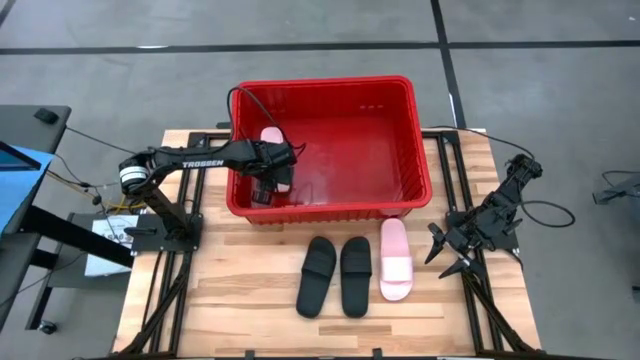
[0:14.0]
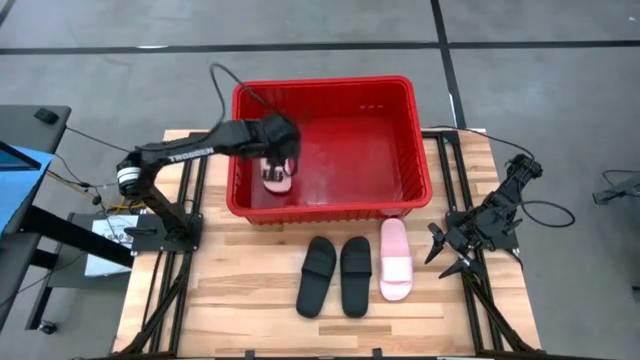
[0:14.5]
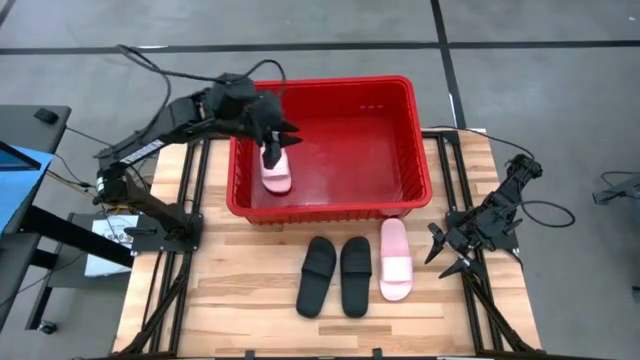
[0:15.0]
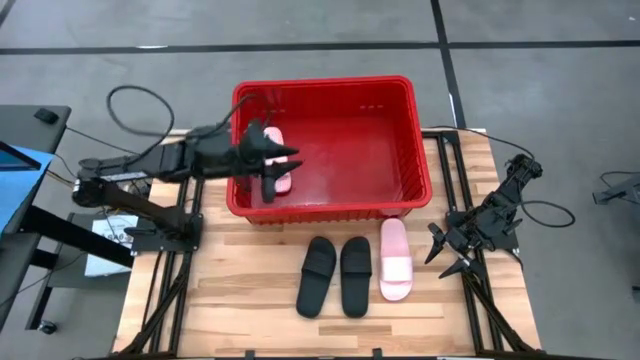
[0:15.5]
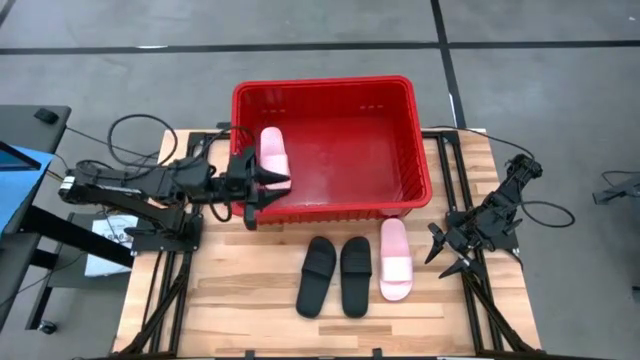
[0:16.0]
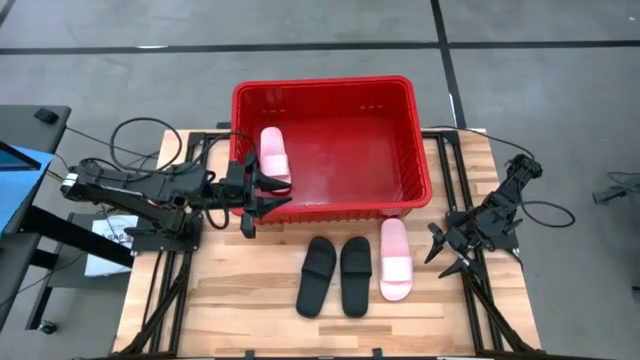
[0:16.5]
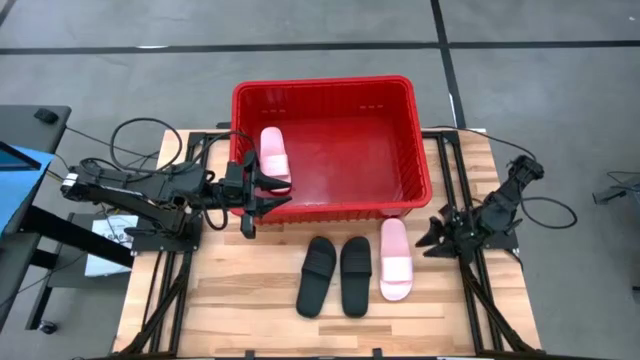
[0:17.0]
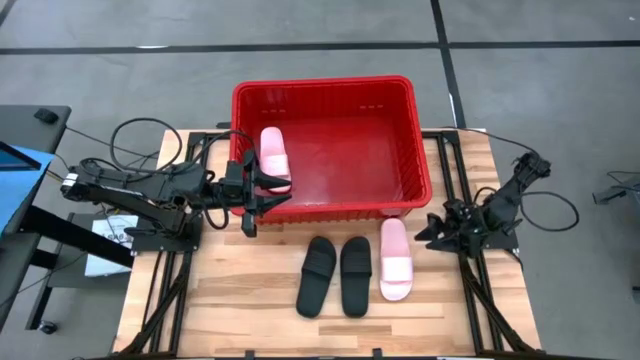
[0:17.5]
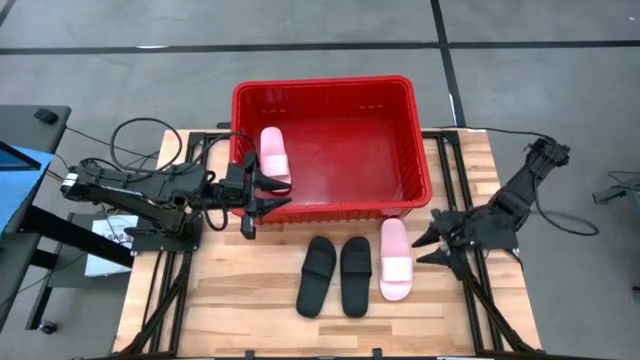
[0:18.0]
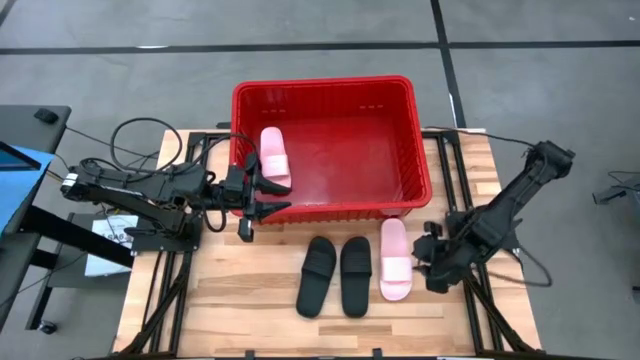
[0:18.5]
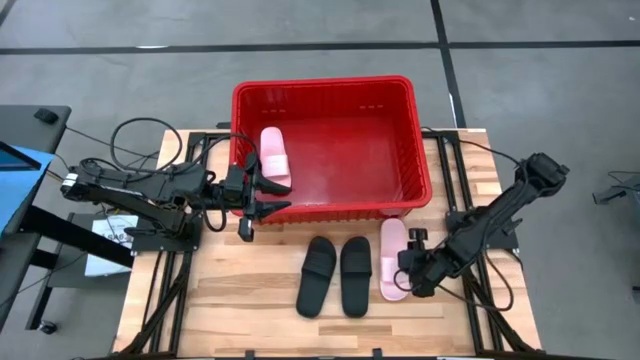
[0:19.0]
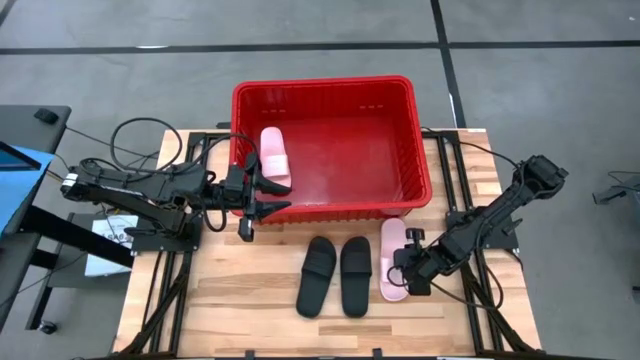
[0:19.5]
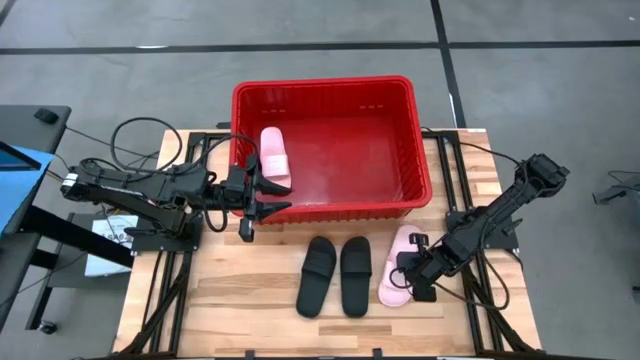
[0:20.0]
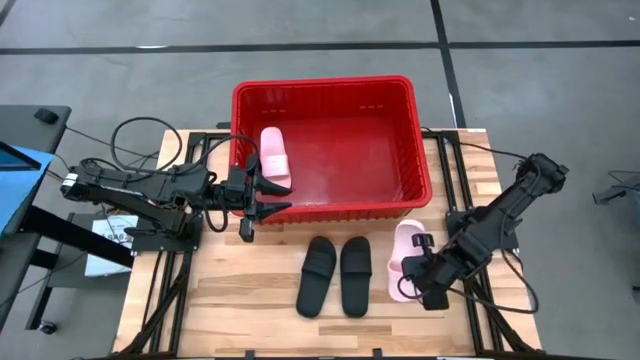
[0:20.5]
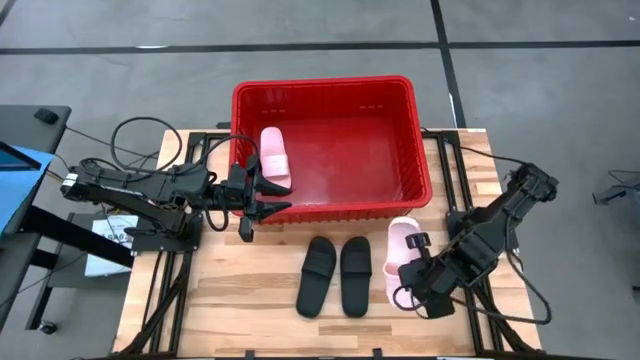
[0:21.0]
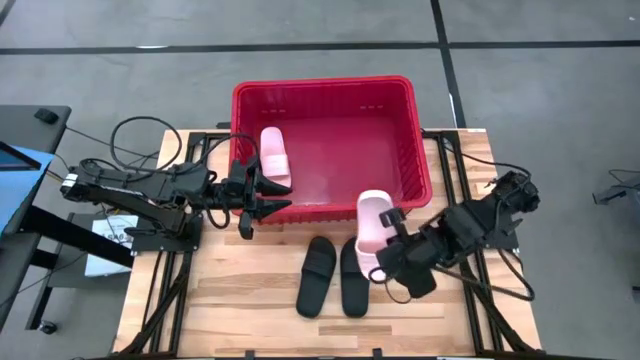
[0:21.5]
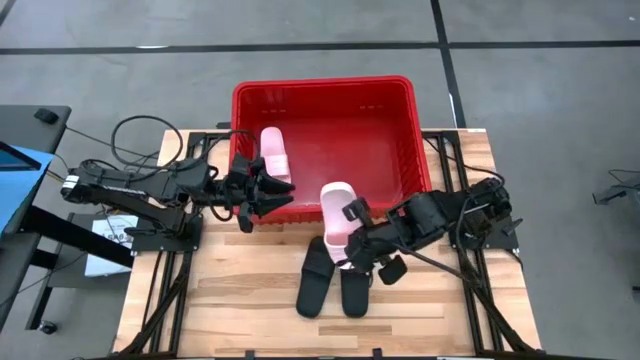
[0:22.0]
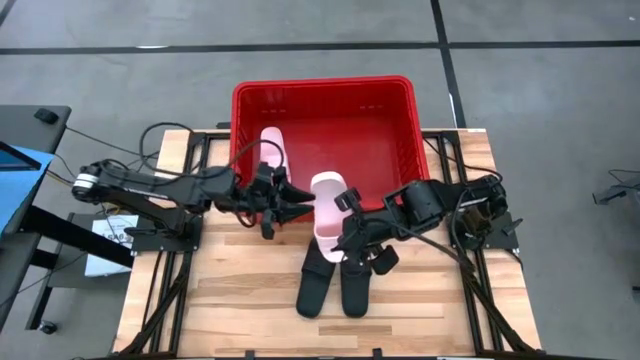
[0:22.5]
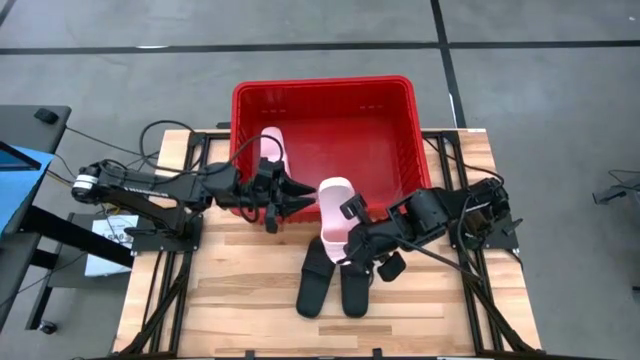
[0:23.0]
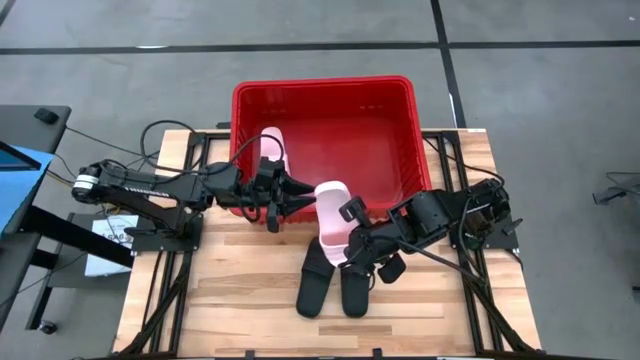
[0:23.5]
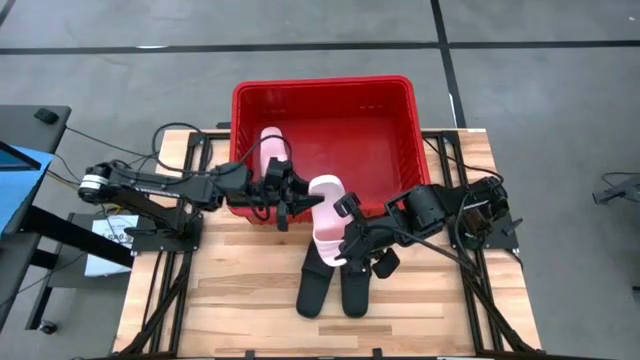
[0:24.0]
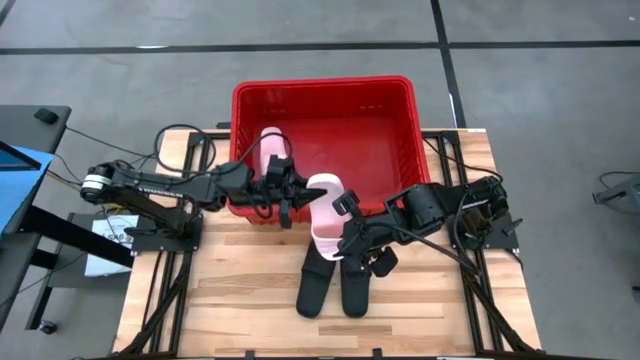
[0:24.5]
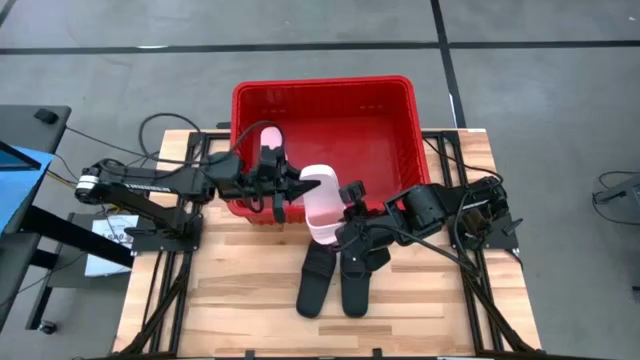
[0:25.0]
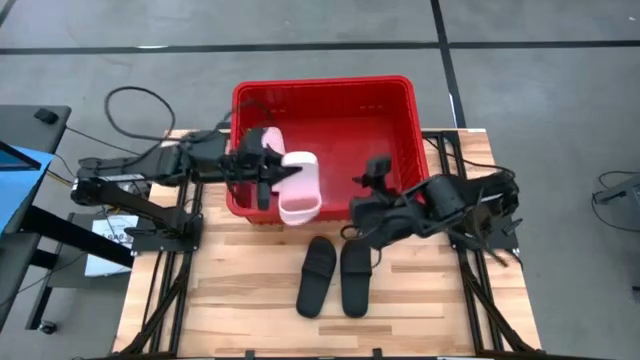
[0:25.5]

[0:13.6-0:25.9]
Task: Pick and place slides into bin
Put the pink slipper in the red bin

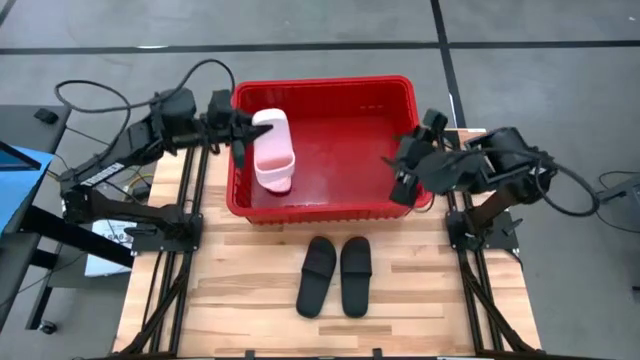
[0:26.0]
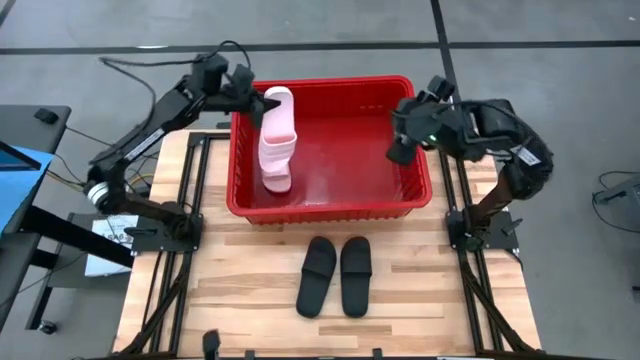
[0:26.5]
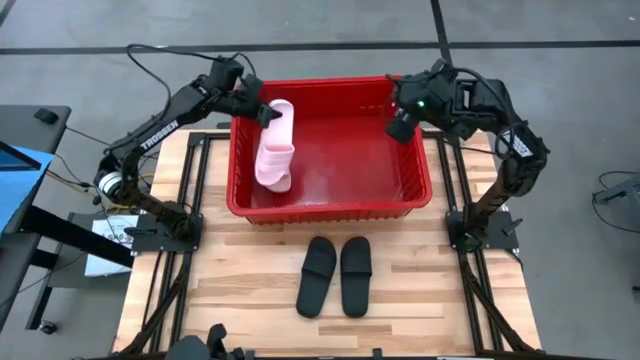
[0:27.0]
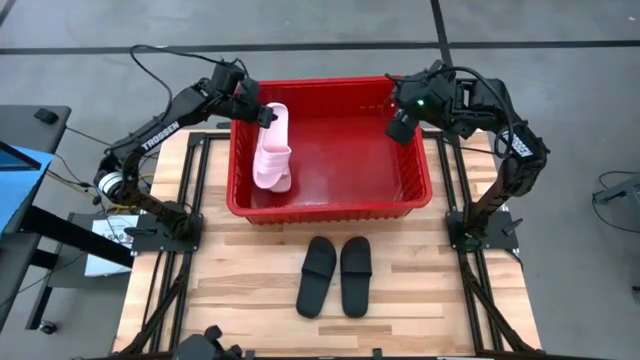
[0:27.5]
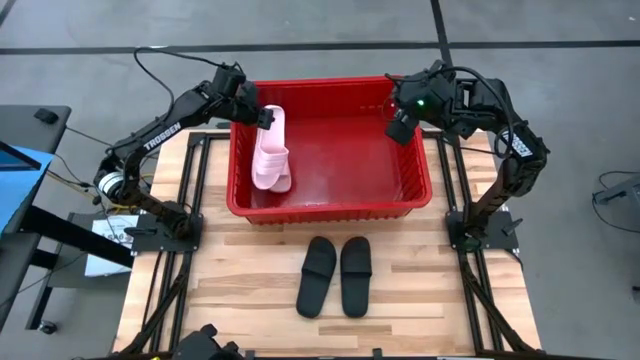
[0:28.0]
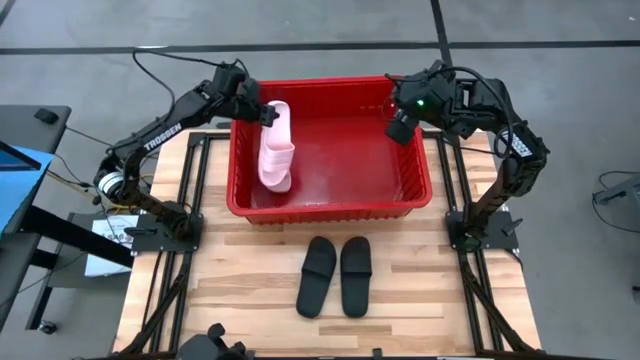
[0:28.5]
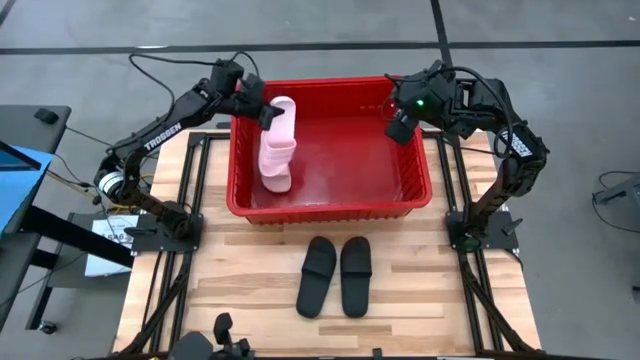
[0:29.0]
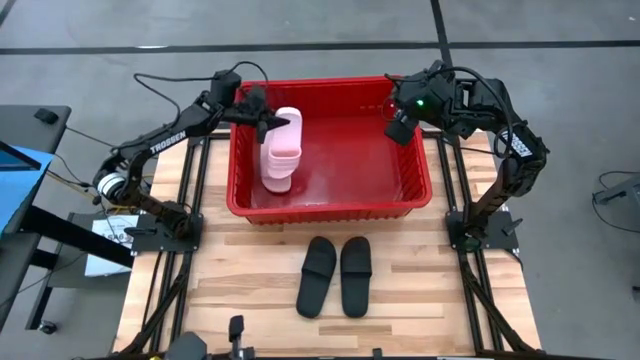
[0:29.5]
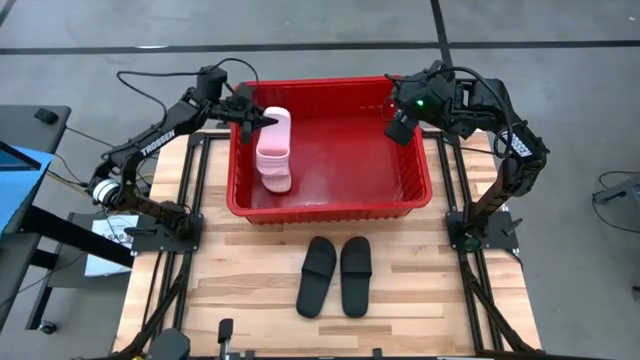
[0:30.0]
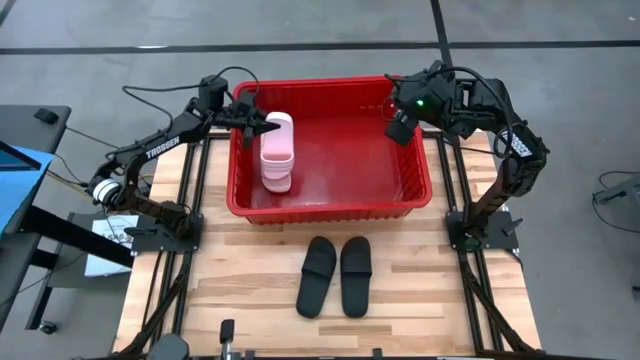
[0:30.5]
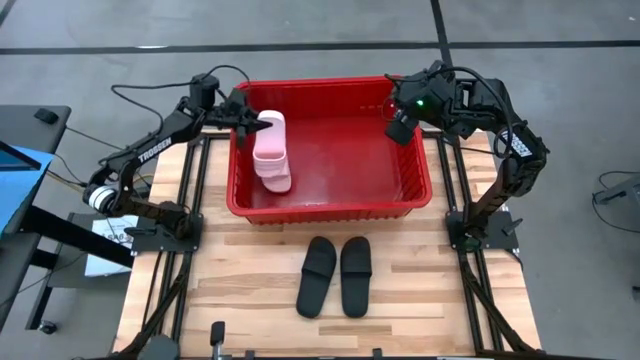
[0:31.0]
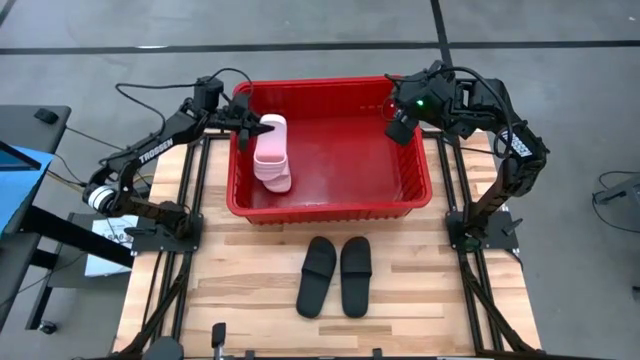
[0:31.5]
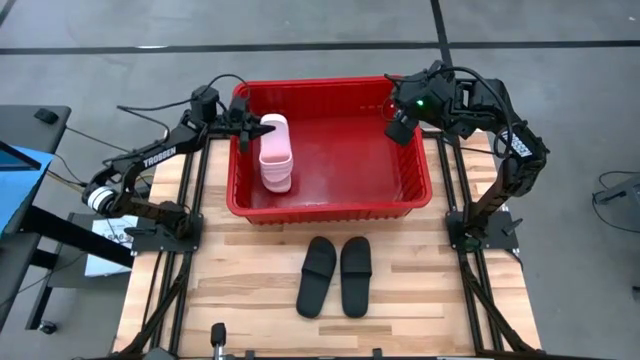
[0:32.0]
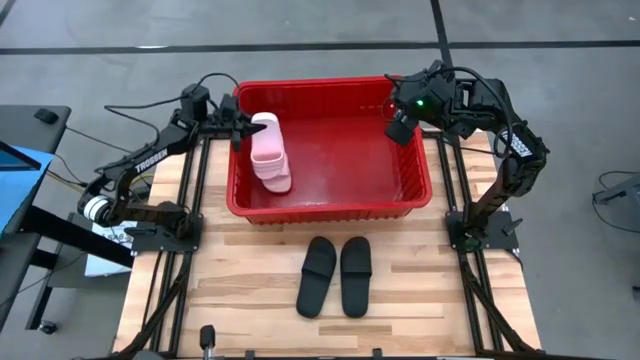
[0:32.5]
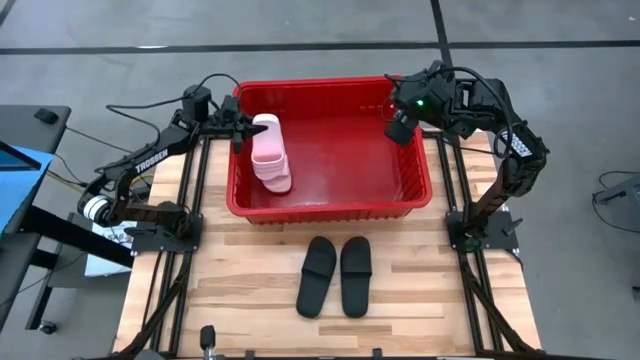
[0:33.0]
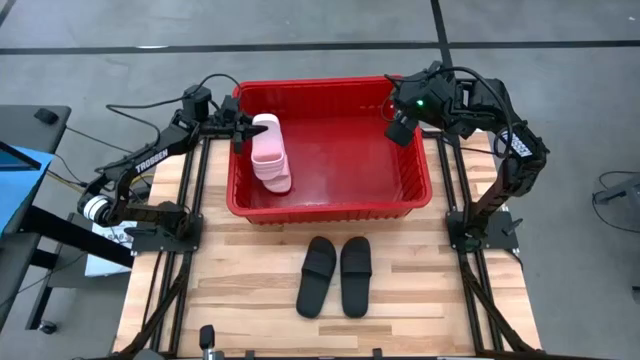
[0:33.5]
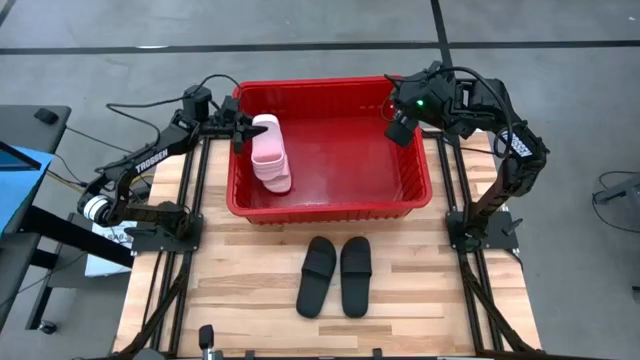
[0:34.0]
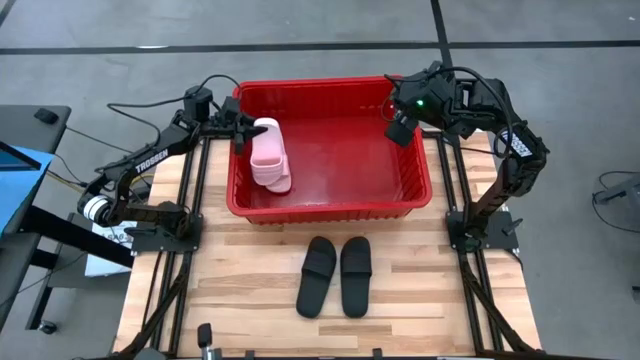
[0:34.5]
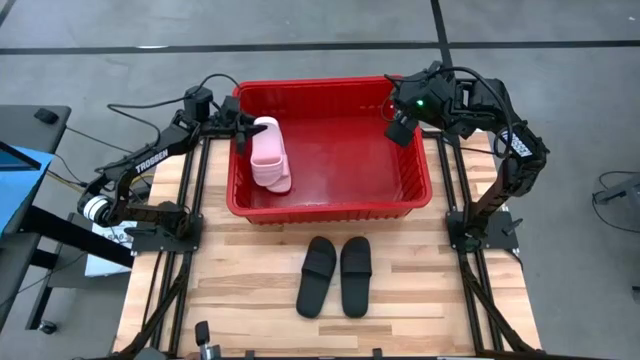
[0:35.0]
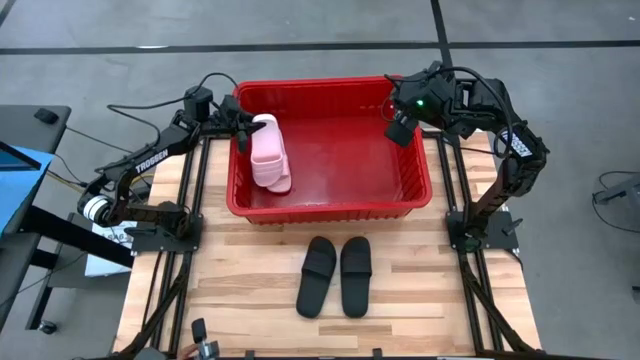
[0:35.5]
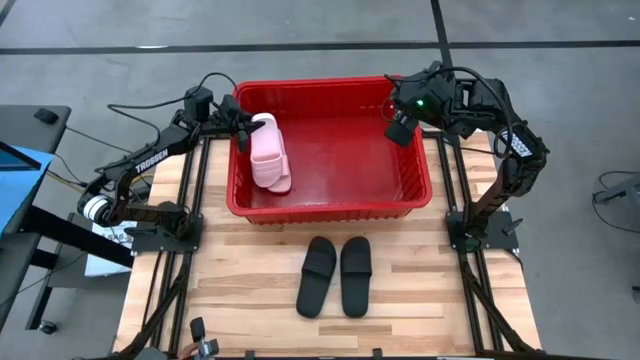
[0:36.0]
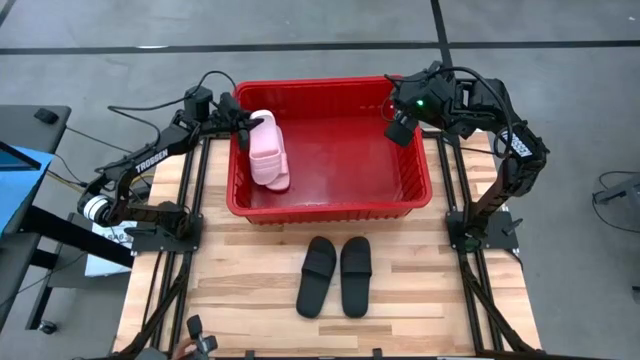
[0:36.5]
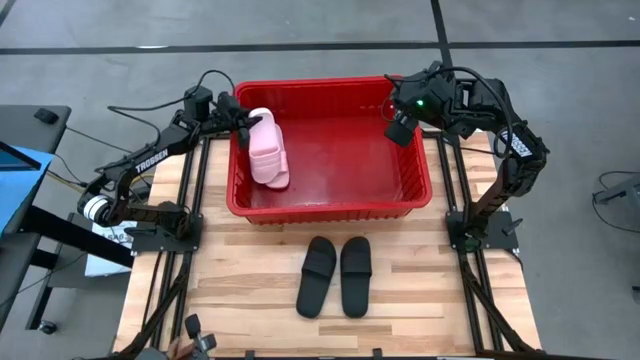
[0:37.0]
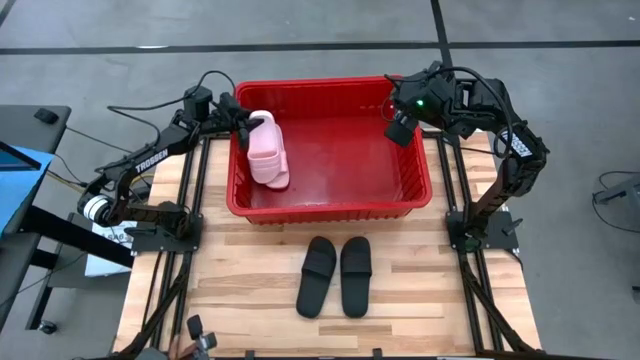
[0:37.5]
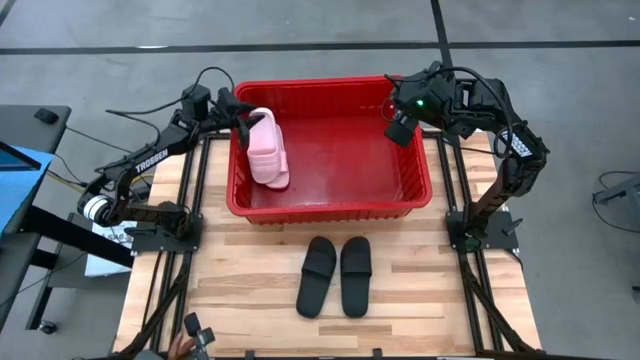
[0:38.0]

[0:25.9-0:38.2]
Put the pink slipper in the red bin
